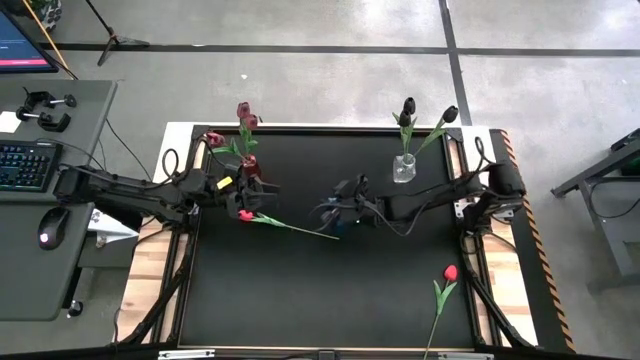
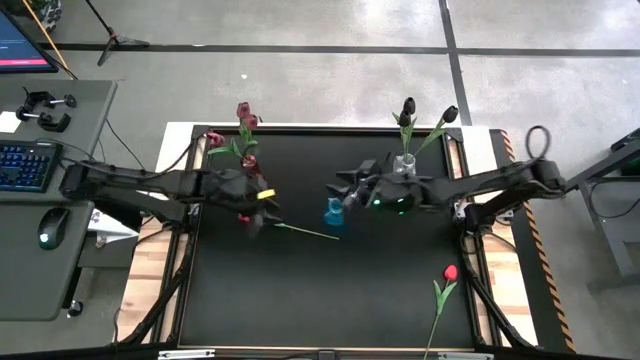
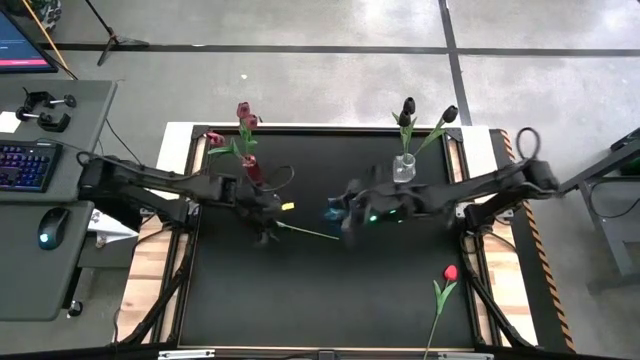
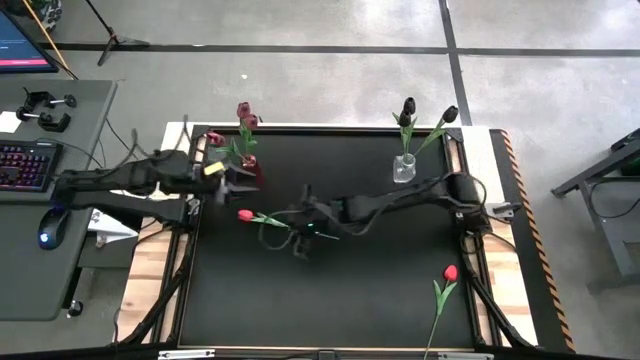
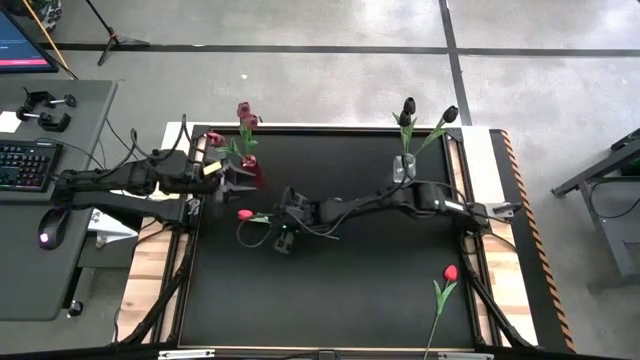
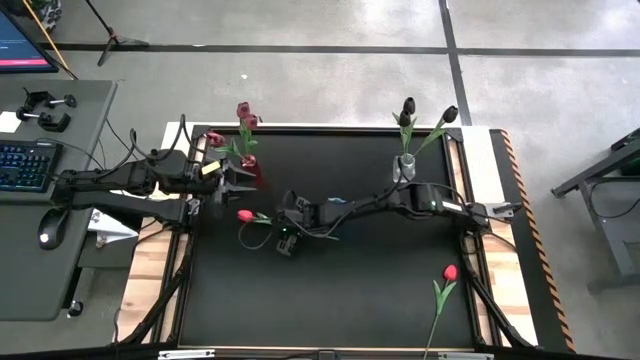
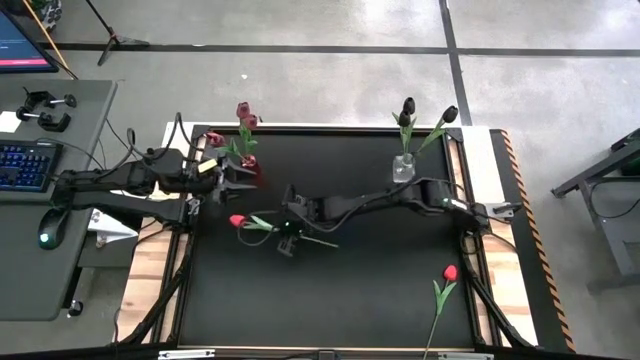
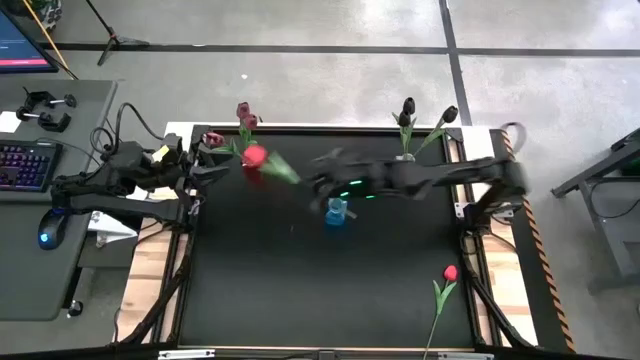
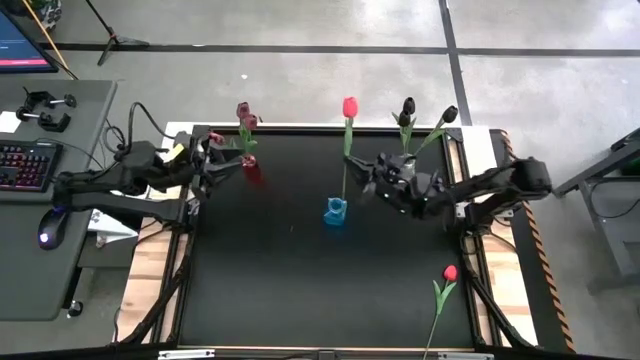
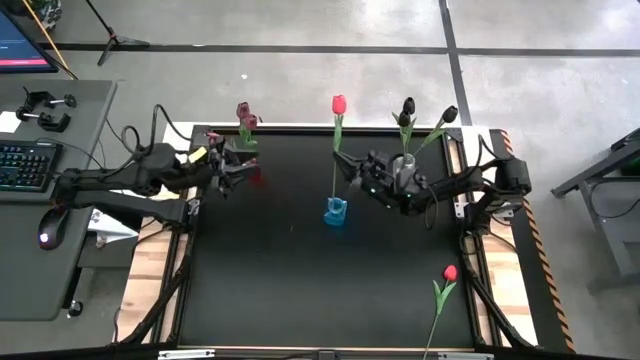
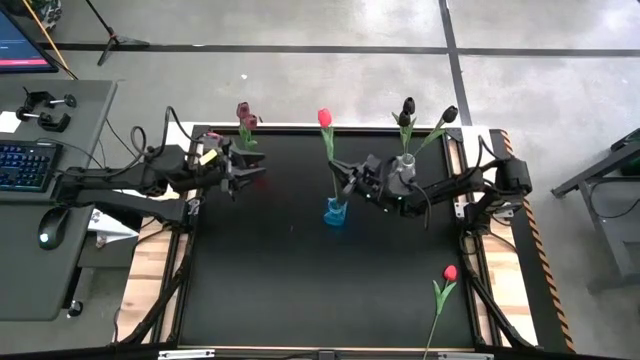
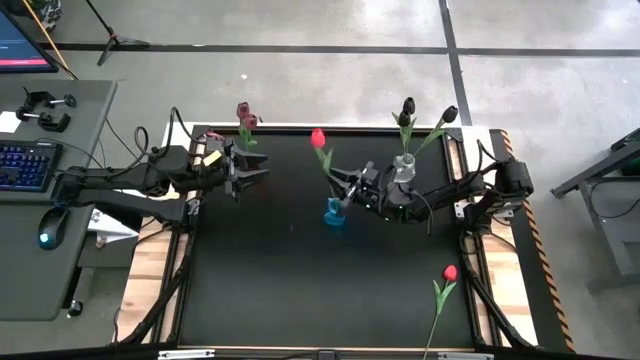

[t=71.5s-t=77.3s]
Task: Sort flowers into vase by color
Put the top red flower into the blue vase

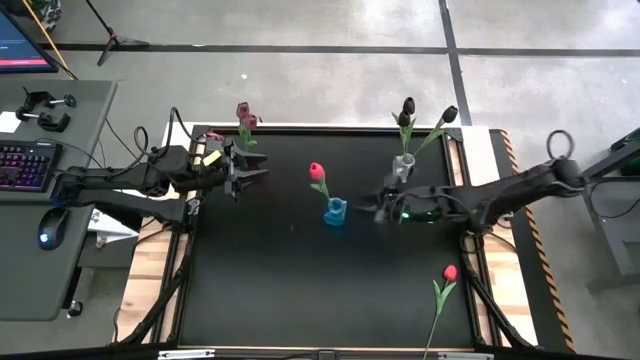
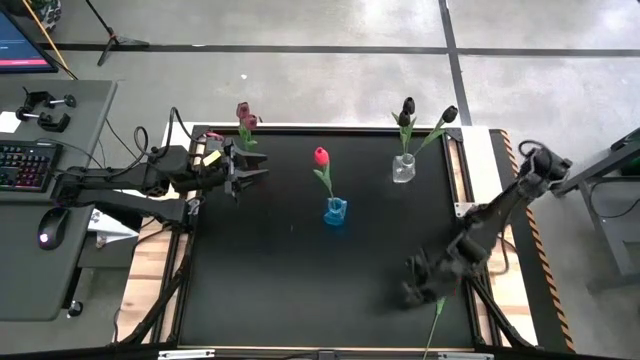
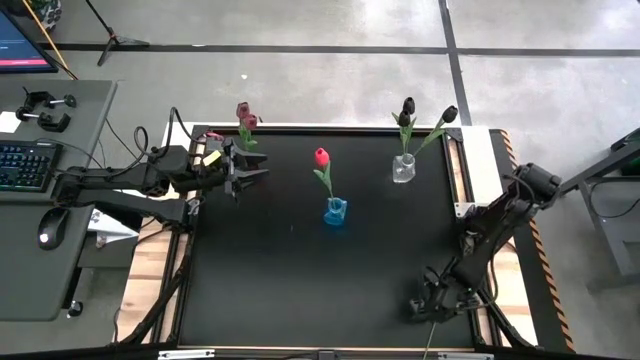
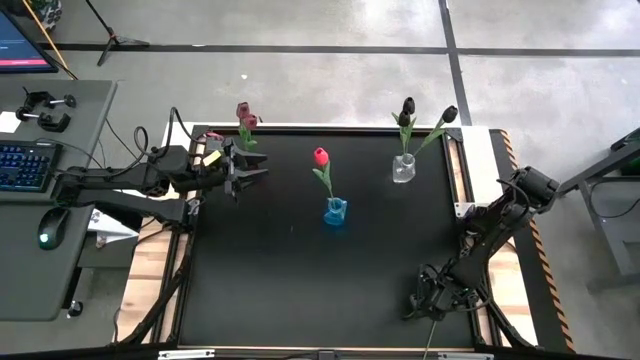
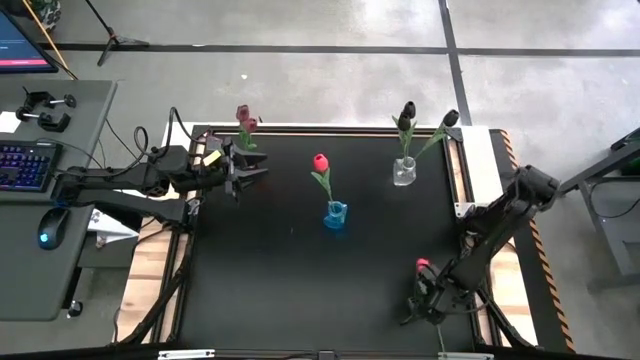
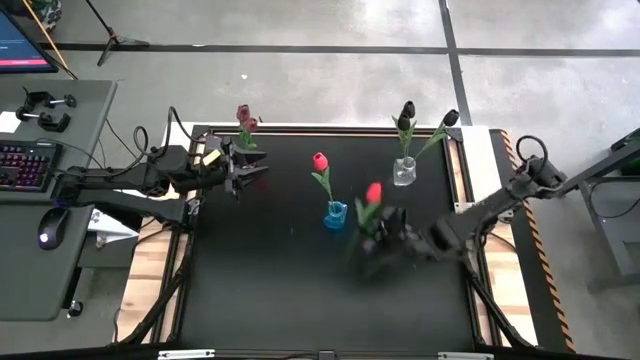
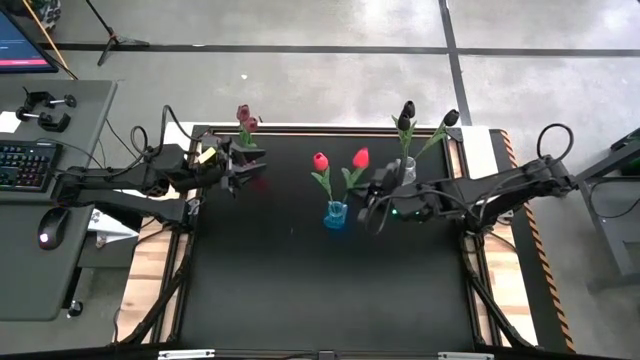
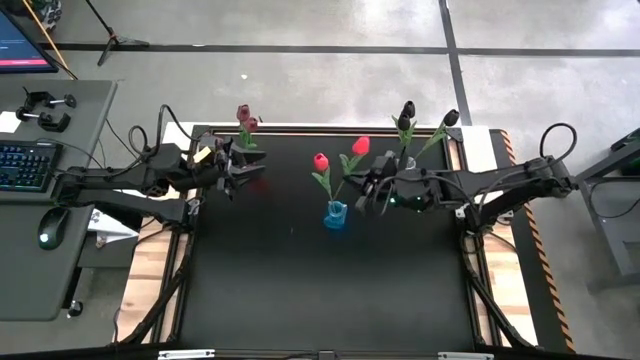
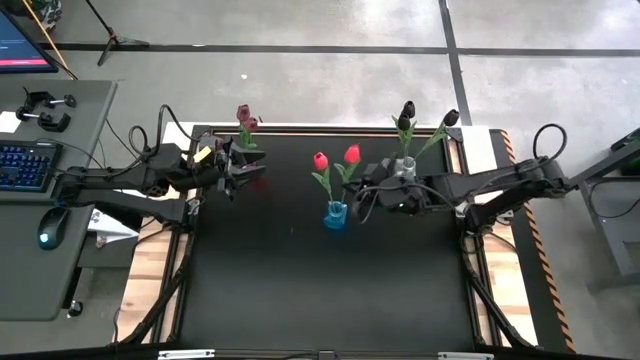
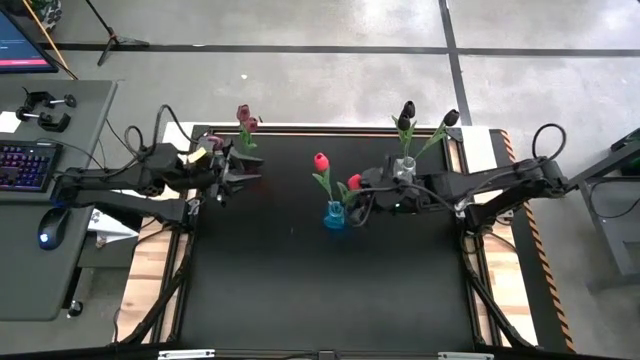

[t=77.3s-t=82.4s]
Put the red flower into the blue vase

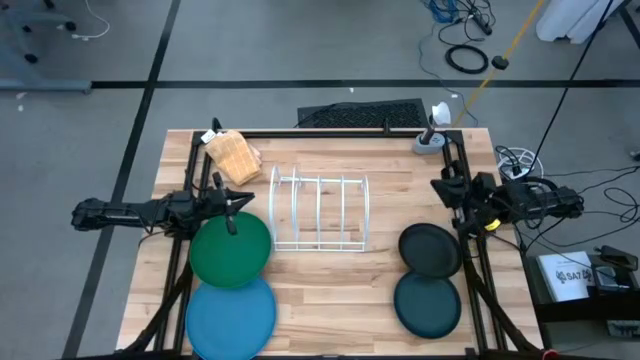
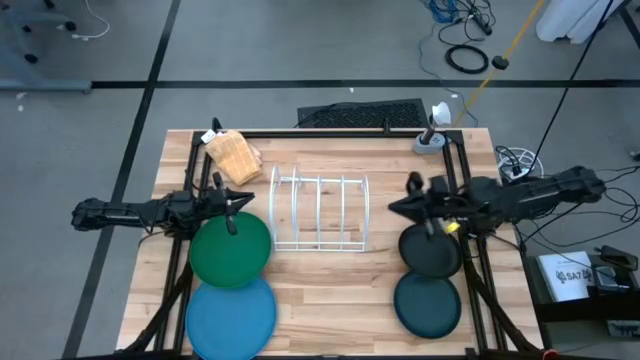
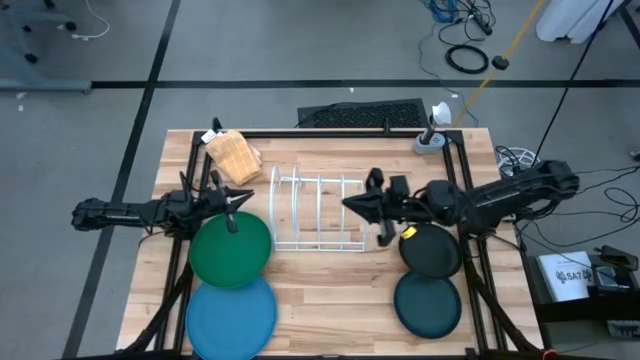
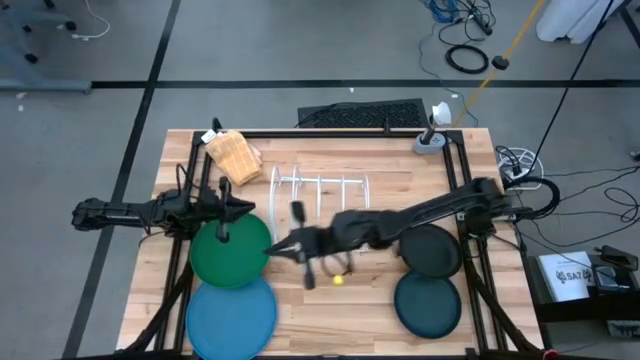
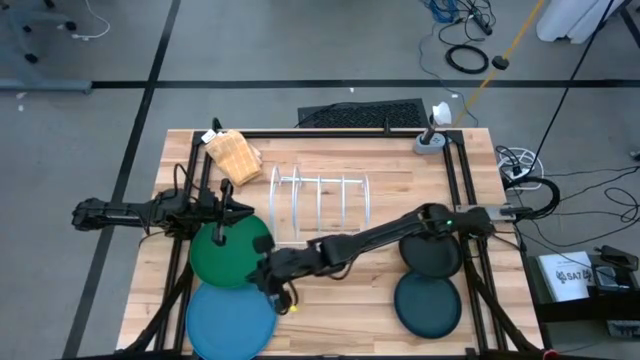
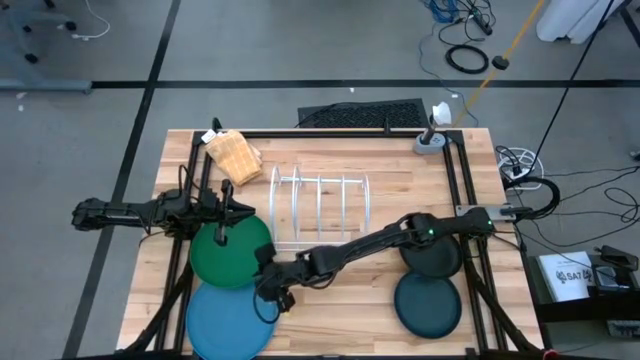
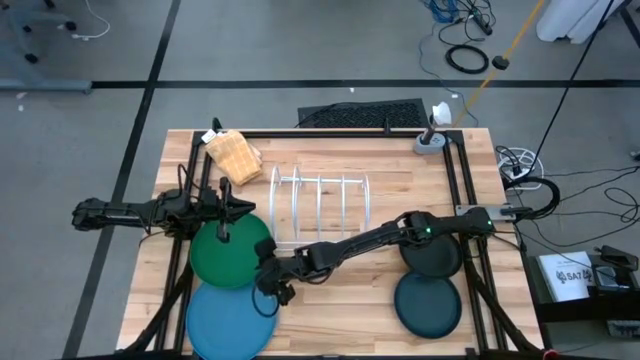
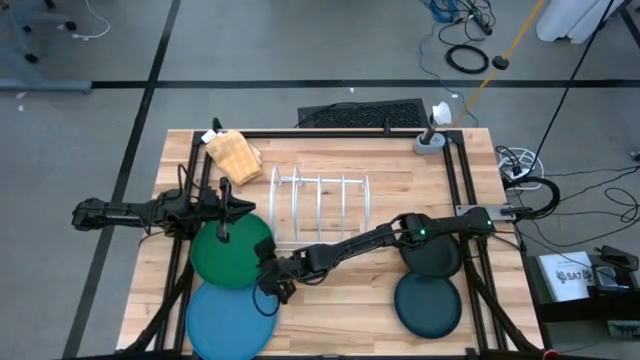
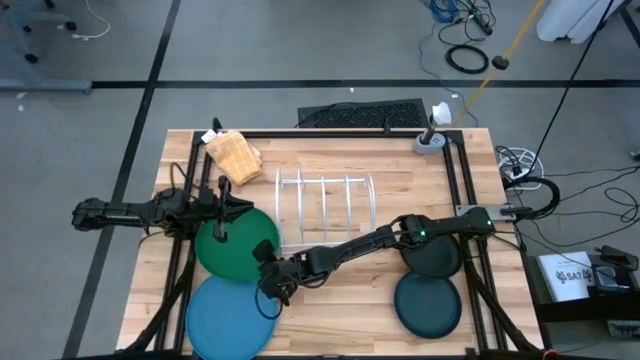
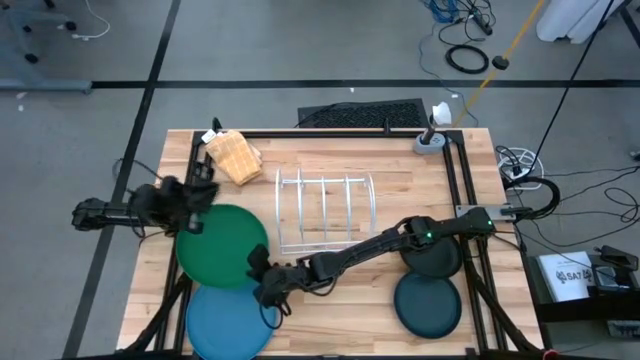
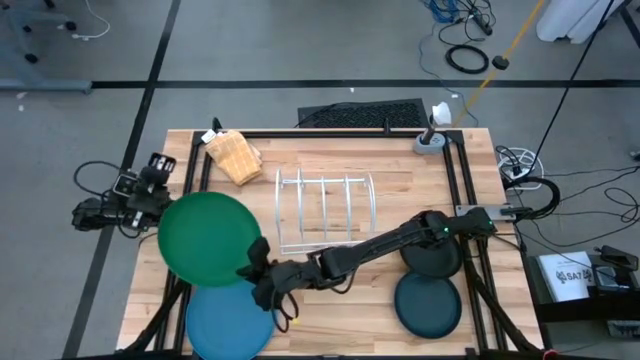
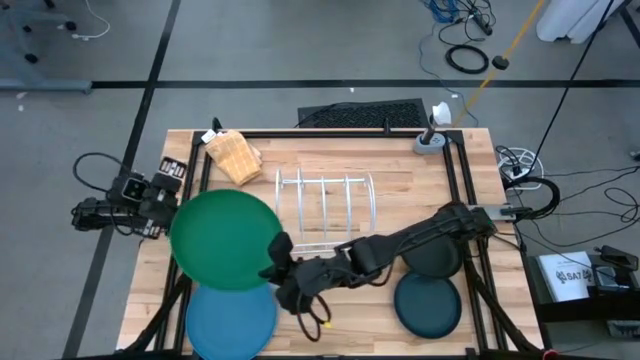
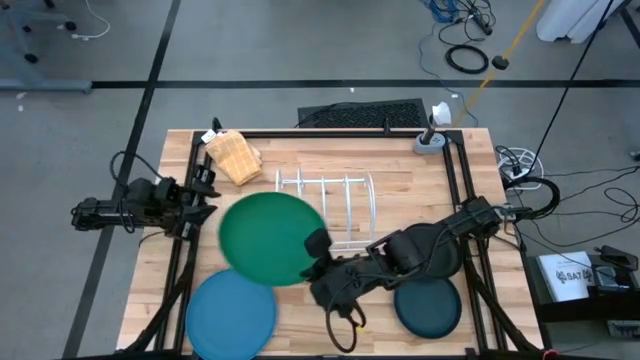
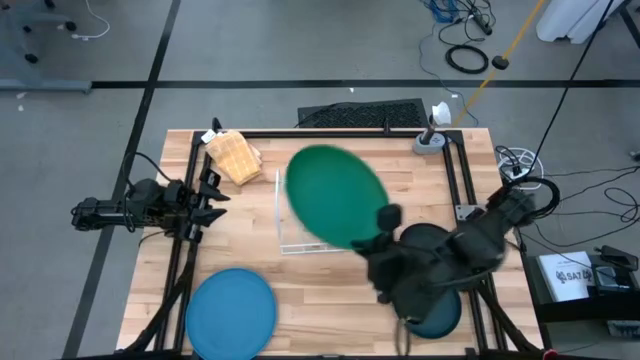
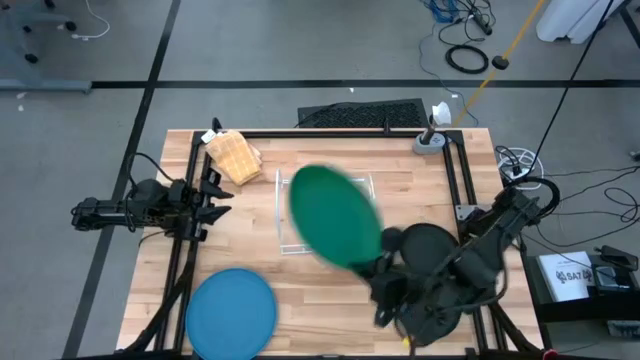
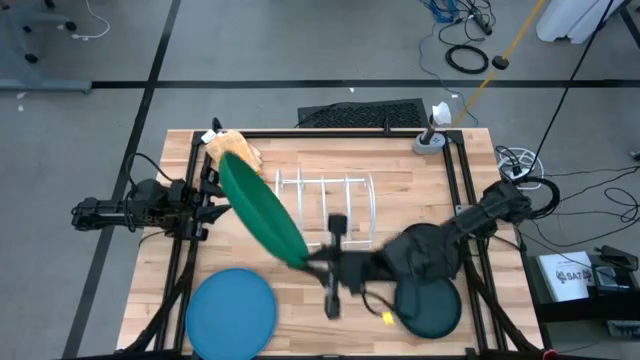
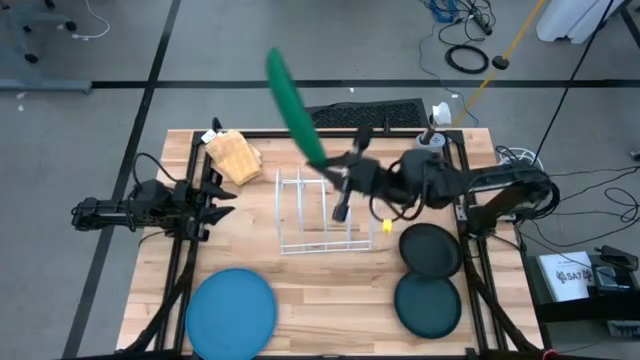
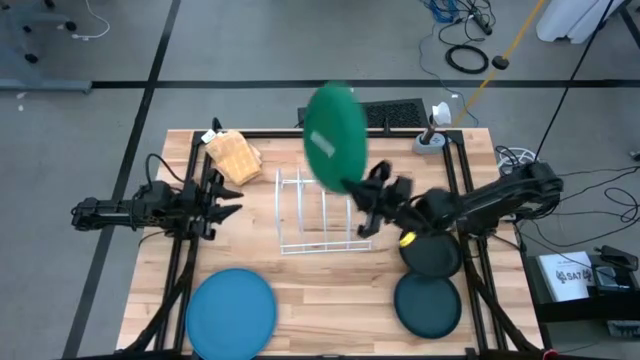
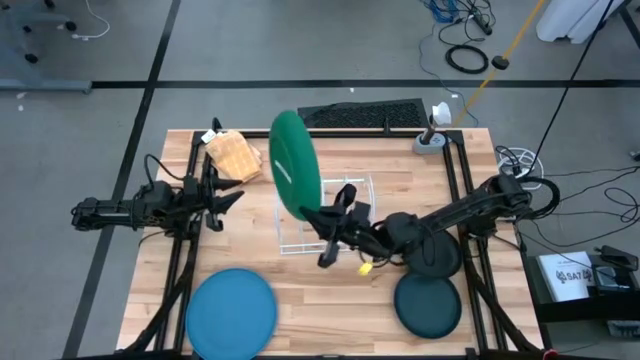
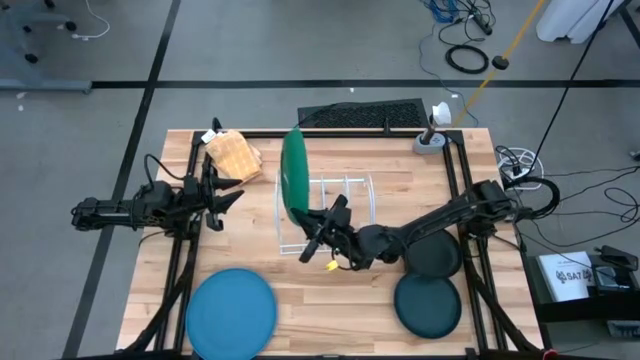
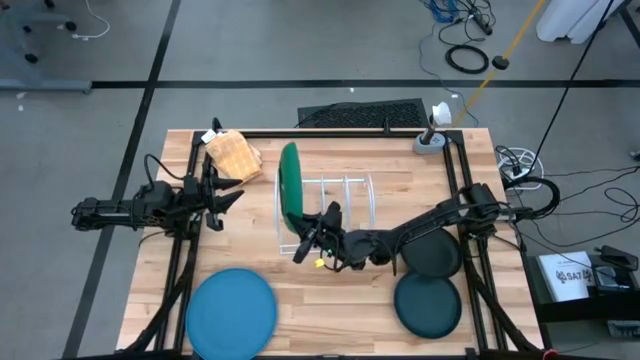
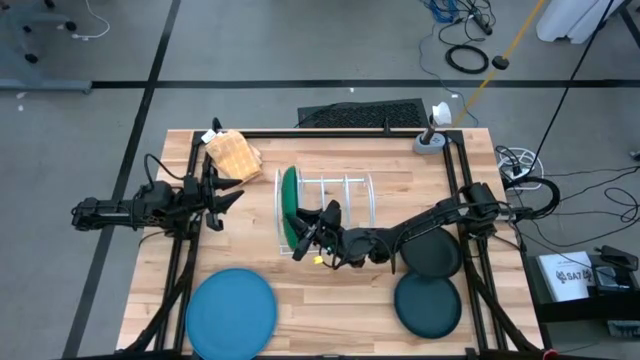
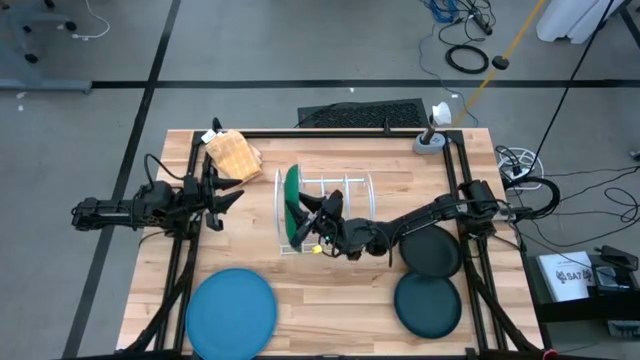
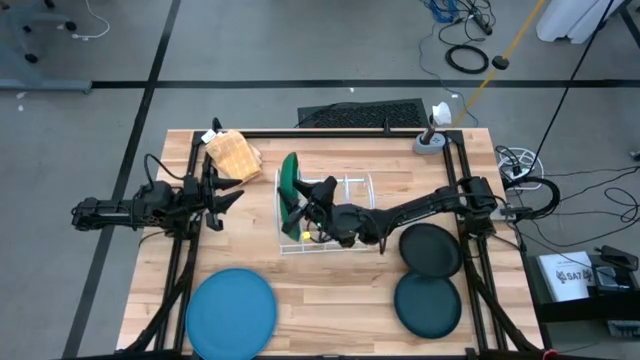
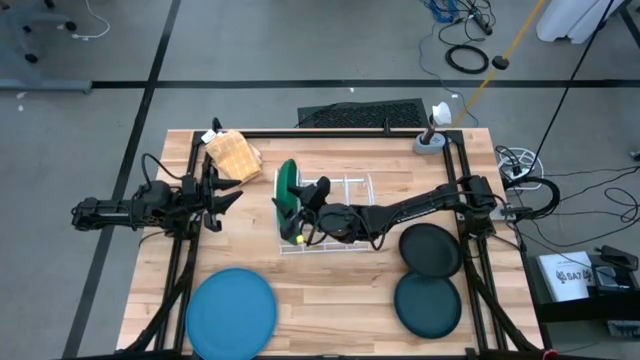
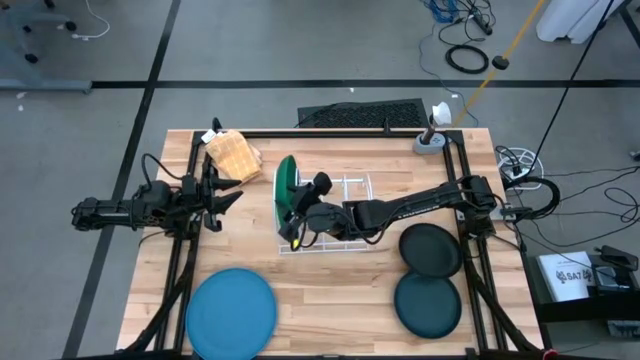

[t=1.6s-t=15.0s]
Task: Sort dishes
Put the green plate in the dish rack
